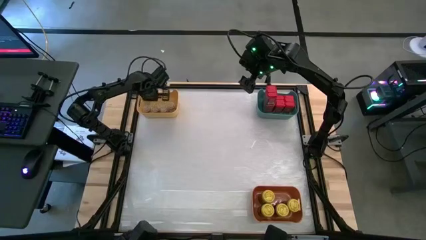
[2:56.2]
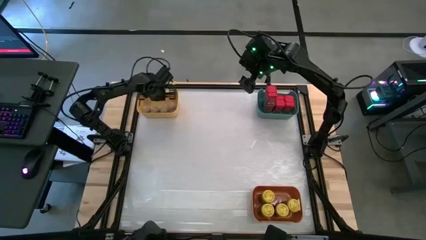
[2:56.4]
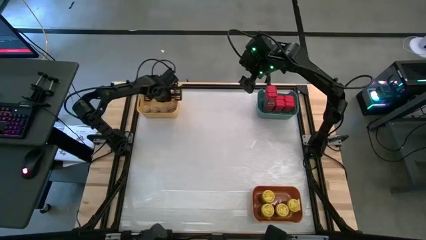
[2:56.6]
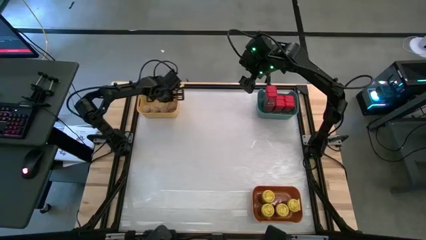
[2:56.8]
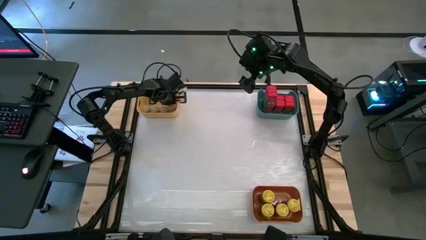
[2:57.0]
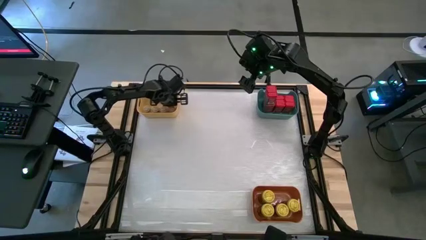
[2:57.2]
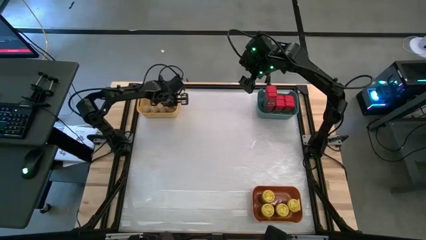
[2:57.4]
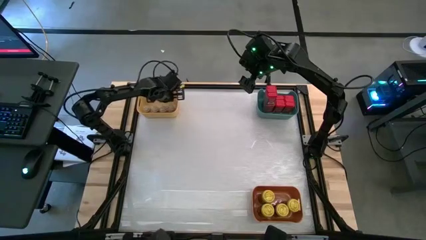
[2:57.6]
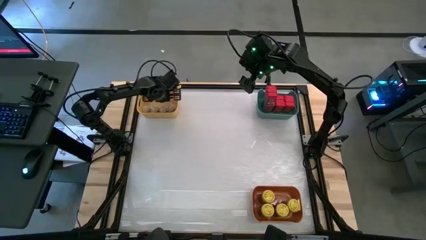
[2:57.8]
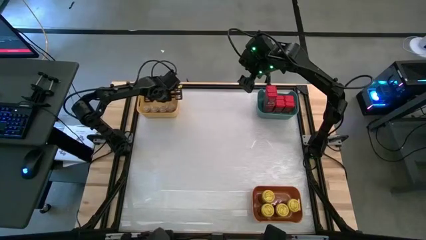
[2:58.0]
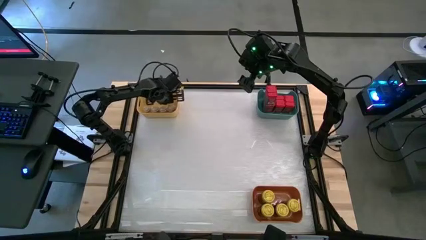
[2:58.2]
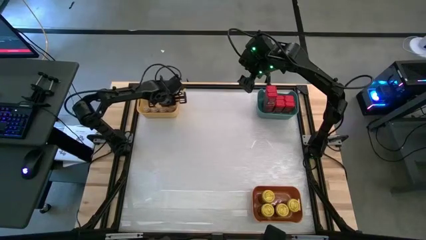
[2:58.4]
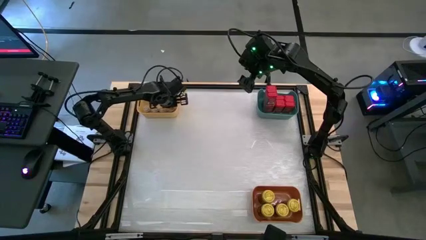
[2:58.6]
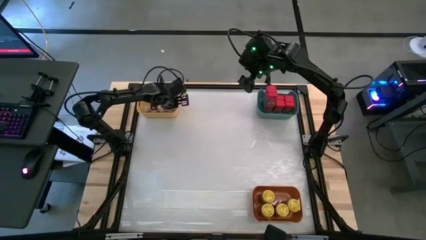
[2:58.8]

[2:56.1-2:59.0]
Task: Sort spices by type
Adjust the brown seasoning bottles in the yellow bin

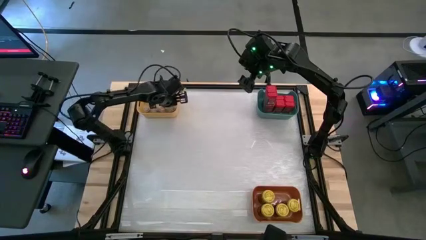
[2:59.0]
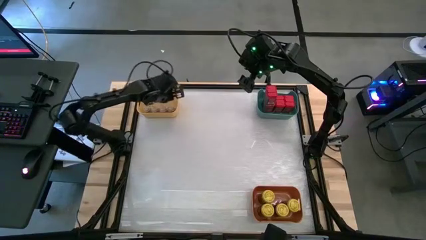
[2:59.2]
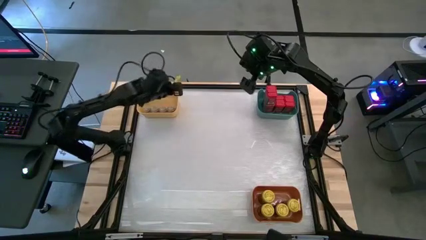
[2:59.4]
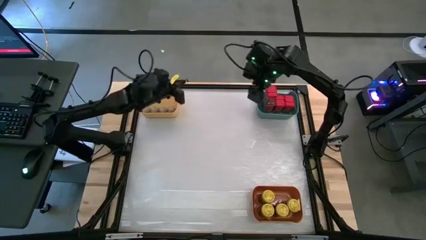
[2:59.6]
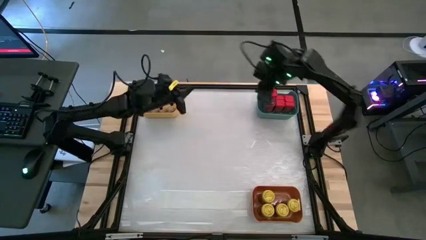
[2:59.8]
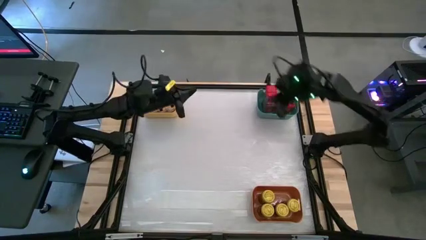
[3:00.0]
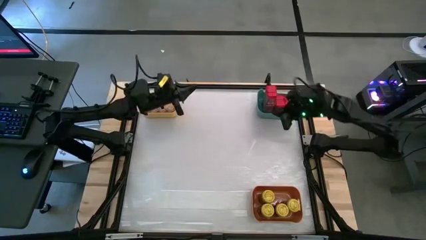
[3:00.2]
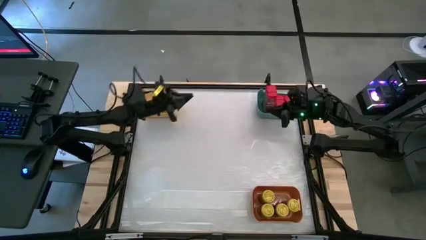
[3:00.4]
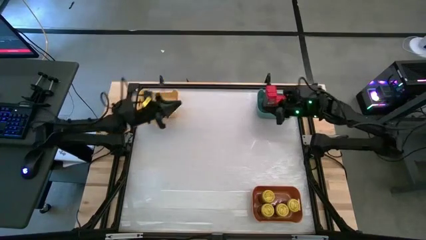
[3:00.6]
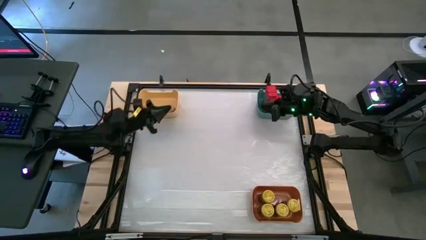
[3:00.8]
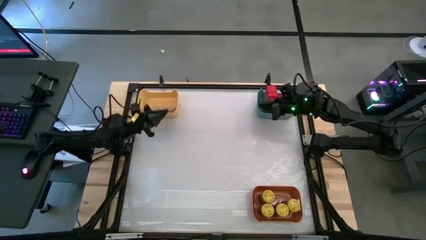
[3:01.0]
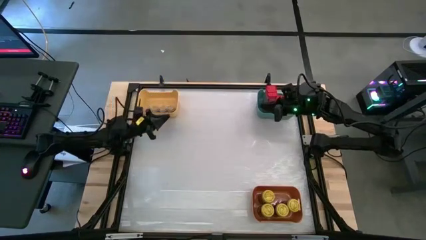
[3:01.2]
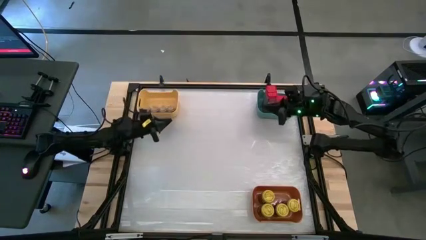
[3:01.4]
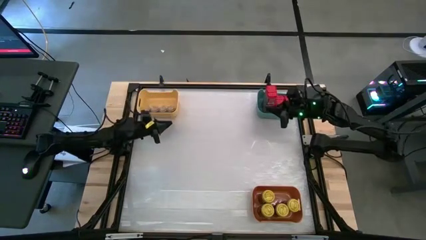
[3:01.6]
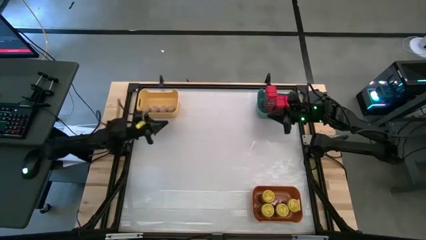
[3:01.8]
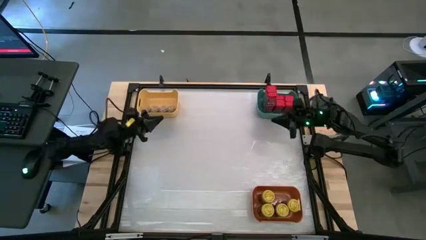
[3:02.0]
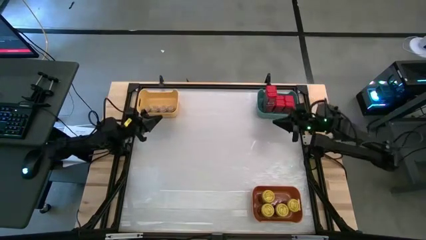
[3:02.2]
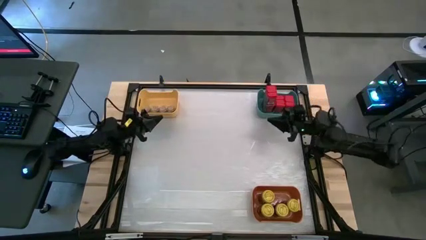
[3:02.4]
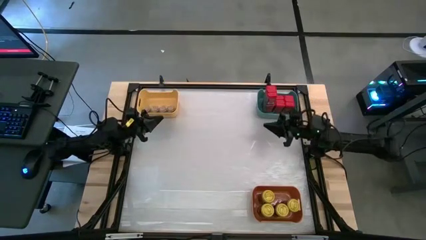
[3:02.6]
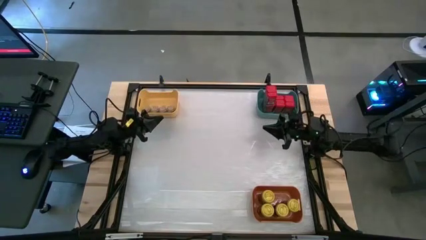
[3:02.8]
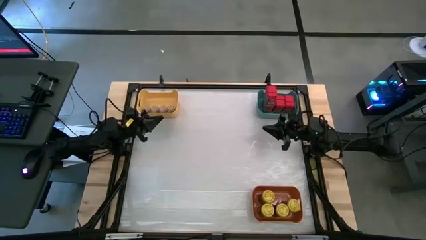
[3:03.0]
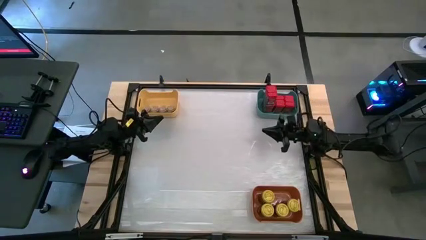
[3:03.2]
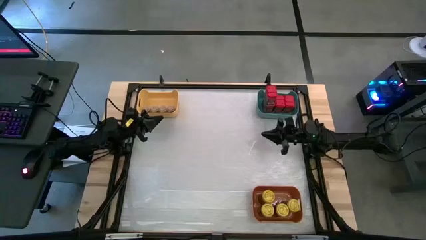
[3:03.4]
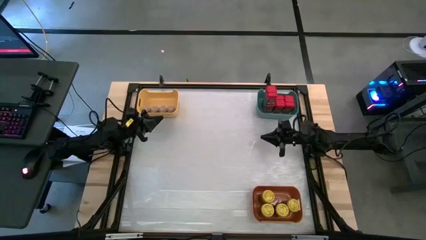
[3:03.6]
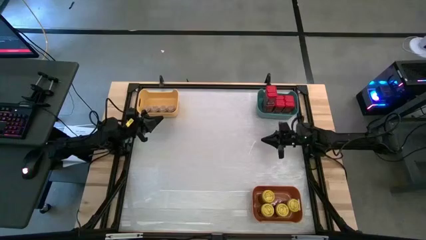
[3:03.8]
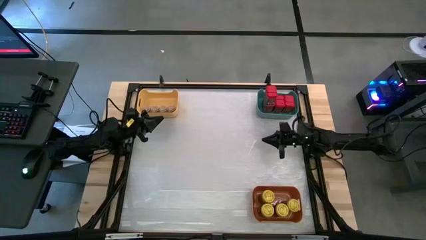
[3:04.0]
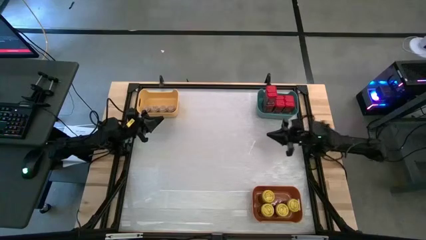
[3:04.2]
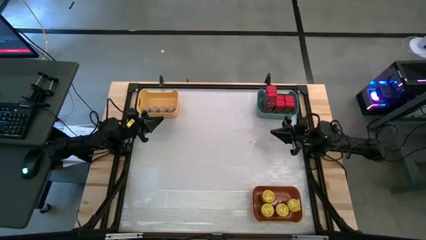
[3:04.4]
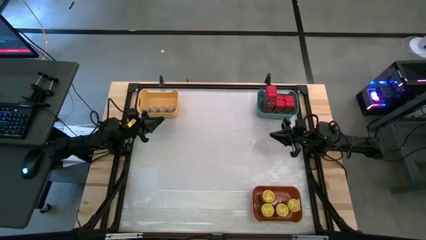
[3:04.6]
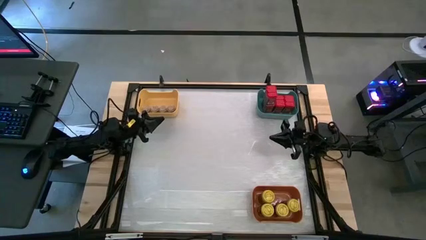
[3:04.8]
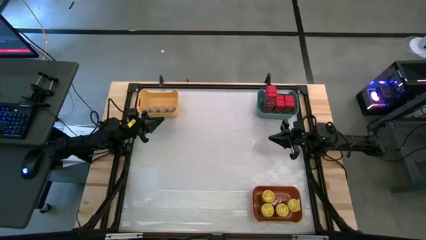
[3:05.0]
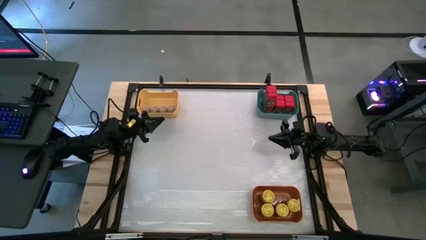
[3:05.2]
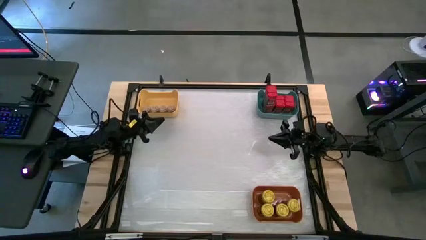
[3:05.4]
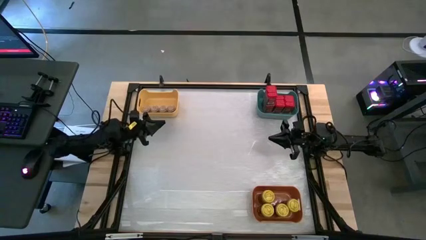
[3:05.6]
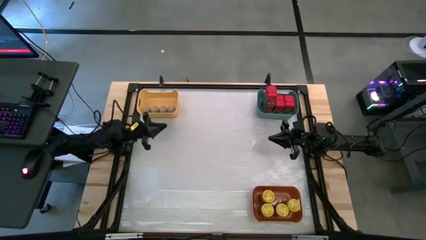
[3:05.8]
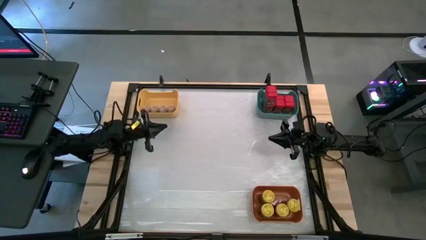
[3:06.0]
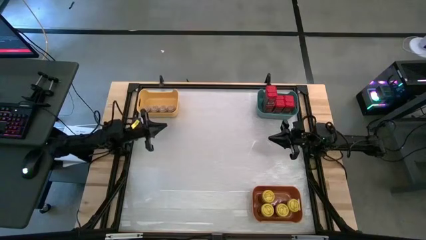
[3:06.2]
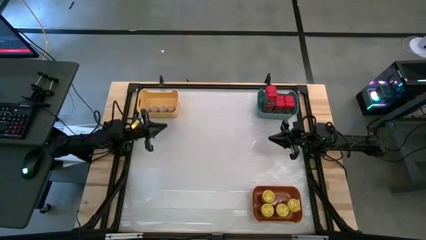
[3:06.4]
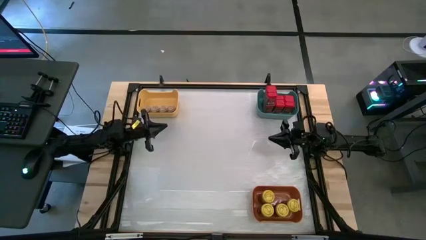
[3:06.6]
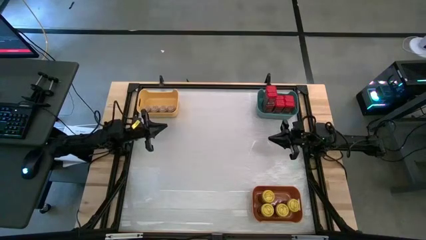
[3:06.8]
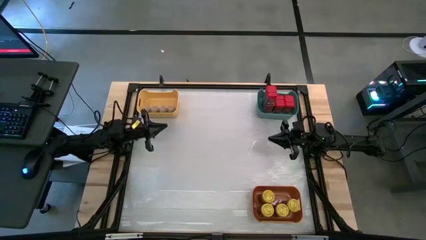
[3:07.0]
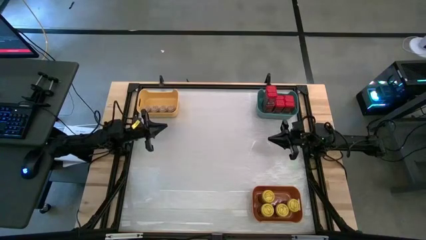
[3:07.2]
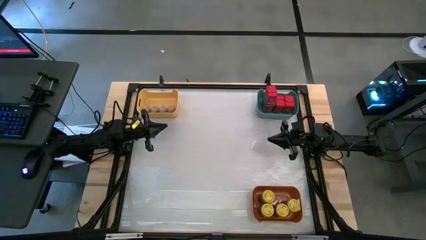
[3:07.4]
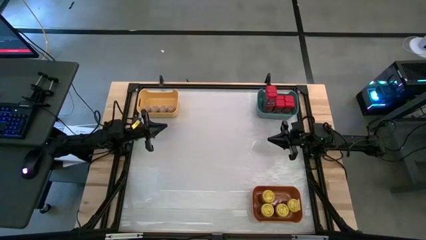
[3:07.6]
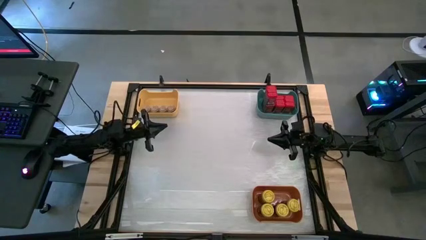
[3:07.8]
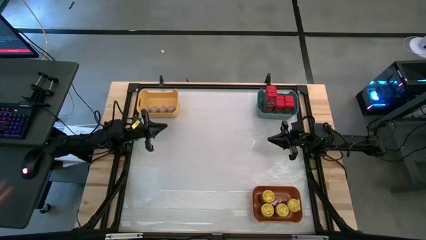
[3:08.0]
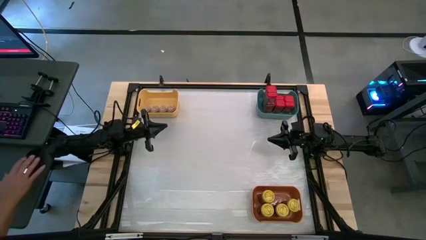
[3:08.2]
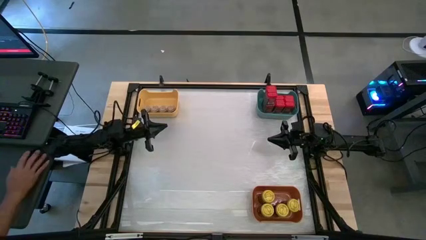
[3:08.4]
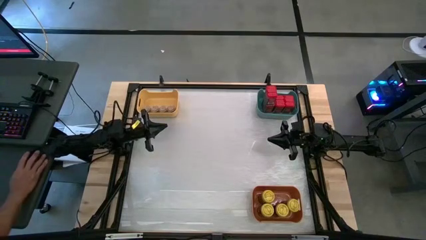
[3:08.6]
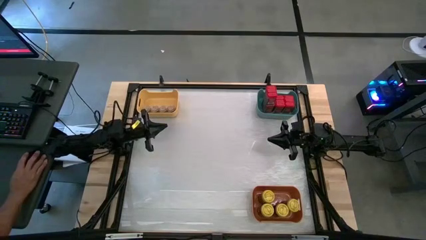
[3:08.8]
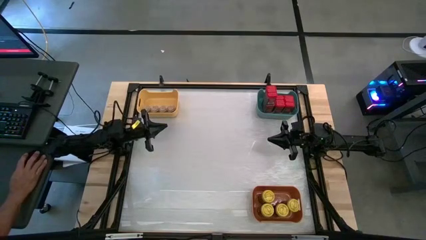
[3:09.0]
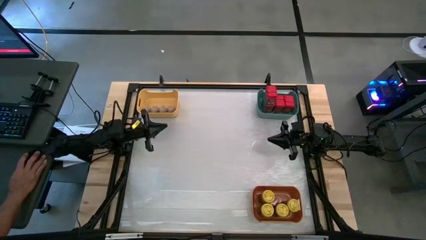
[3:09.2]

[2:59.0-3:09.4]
Return to Home Position

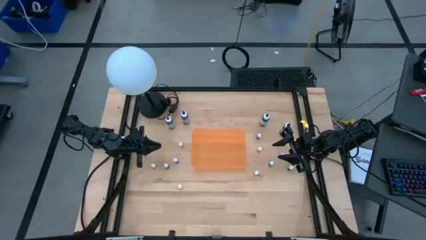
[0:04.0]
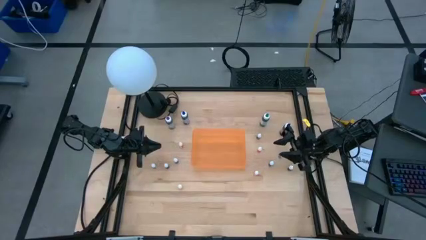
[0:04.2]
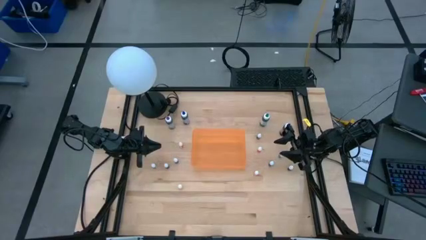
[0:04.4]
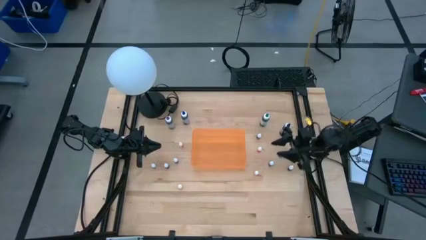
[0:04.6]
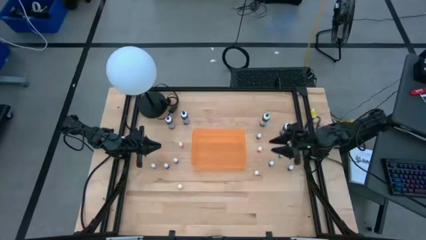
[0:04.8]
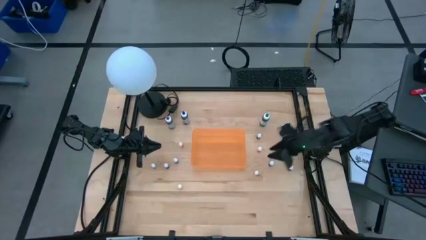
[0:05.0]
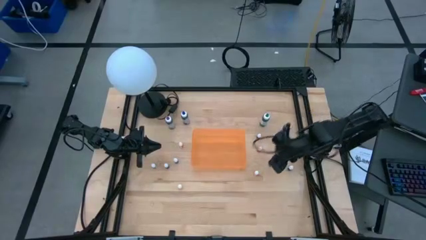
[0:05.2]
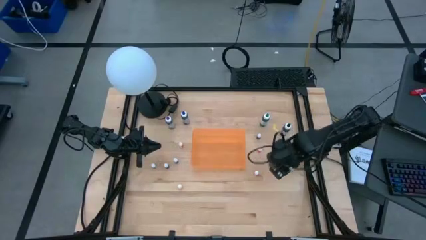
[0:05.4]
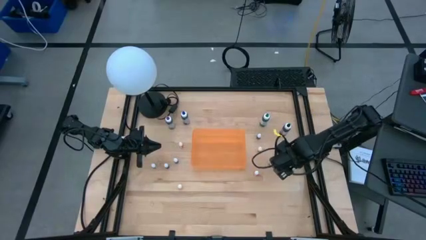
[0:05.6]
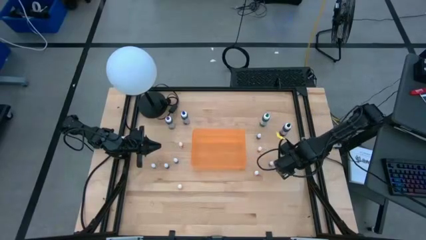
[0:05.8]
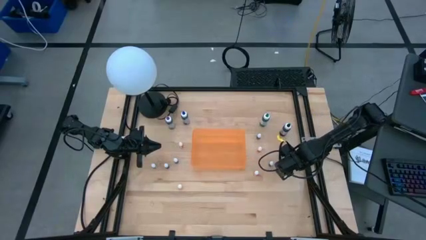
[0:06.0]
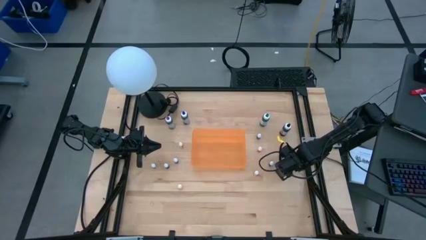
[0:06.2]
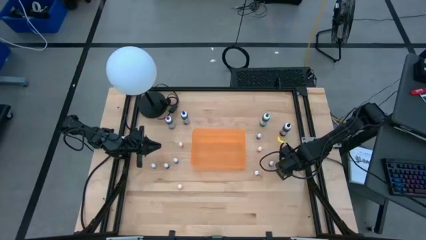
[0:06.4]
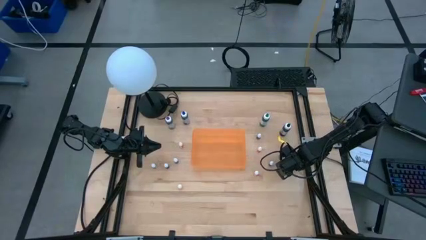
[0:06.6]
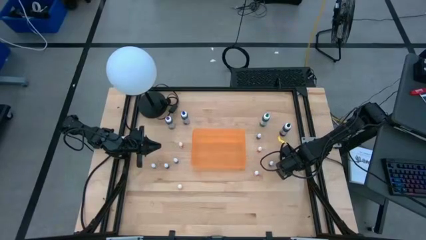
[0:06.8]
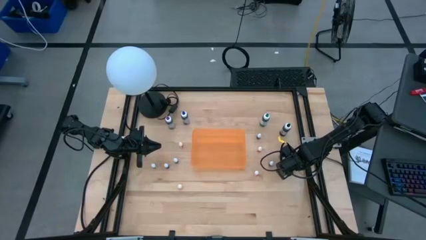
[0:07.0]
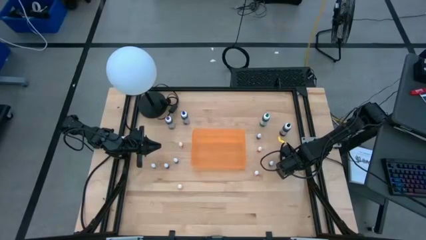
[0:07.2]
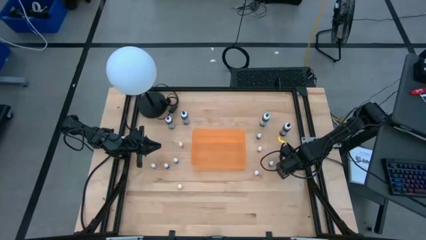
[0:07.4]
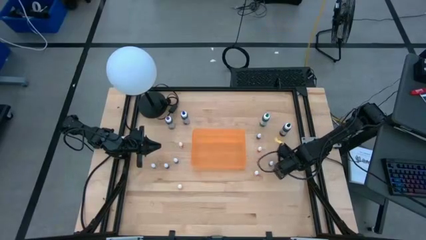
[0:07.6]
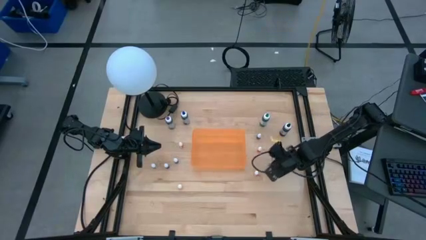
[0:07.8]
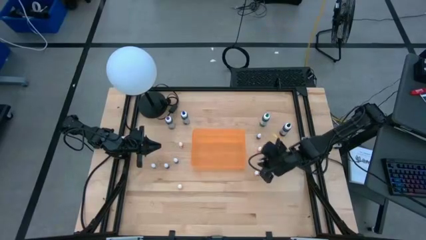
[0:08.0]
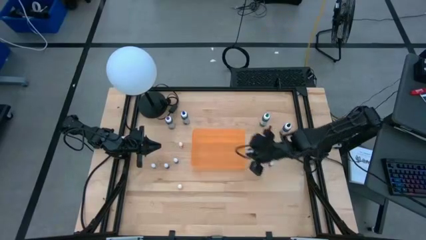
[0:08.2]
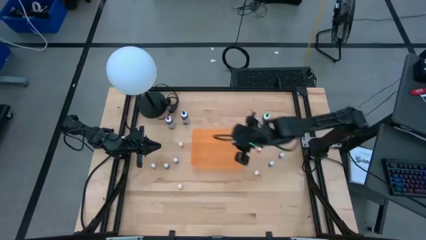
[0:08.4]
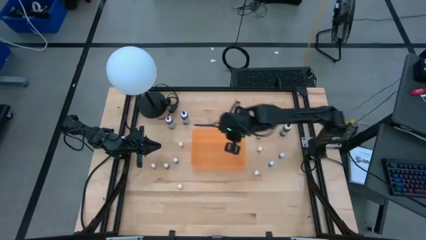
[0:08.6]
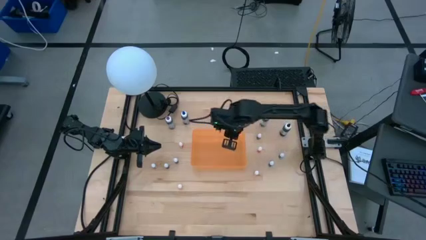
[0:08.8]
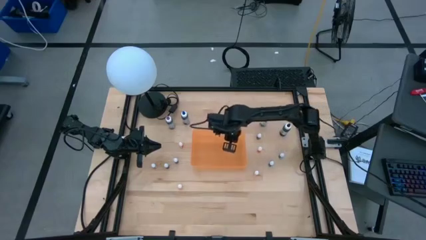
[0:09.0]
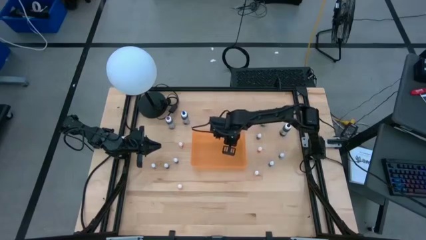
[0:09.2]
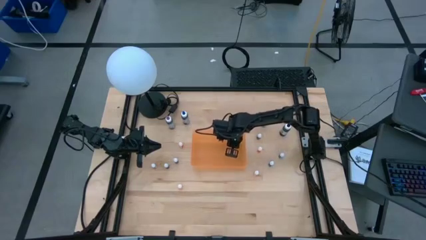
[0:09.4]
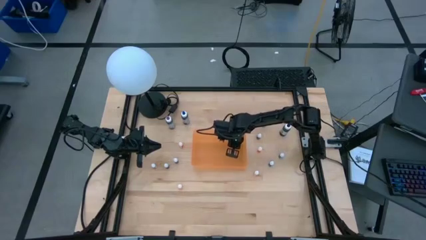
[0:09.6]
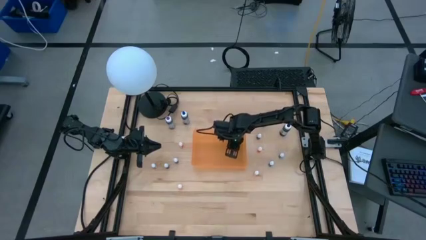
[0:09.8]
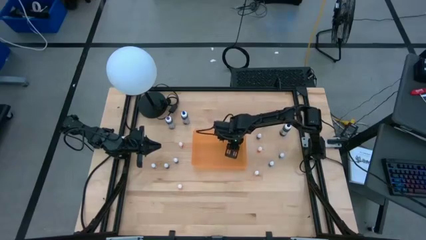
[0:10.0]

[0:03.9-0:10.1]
Task: Pick & Place food coloring
Put the small black food coloring bottle into the orange bin
